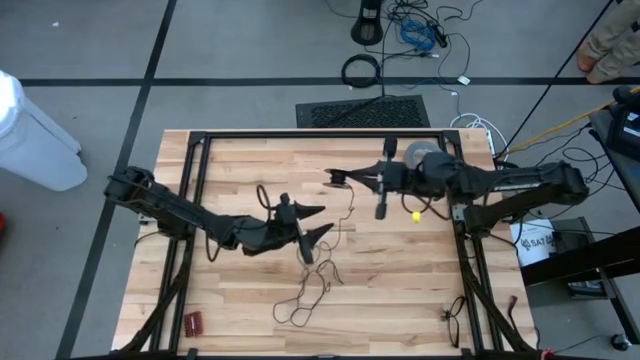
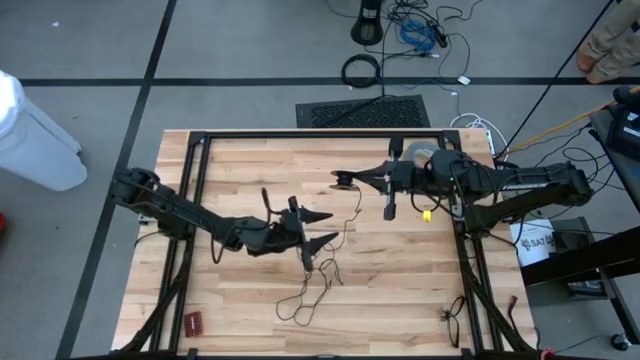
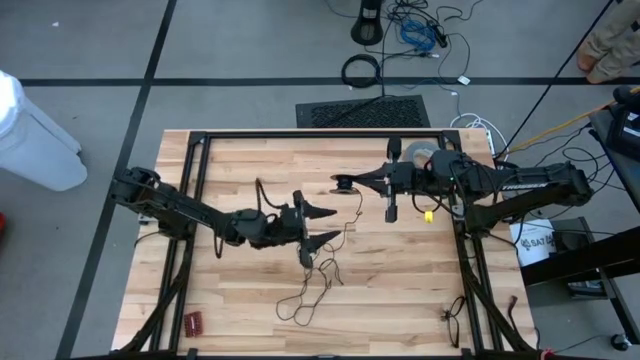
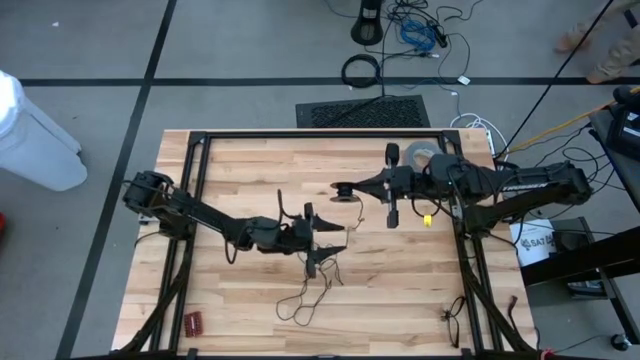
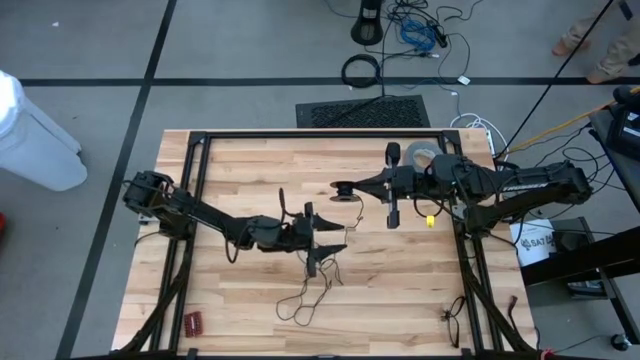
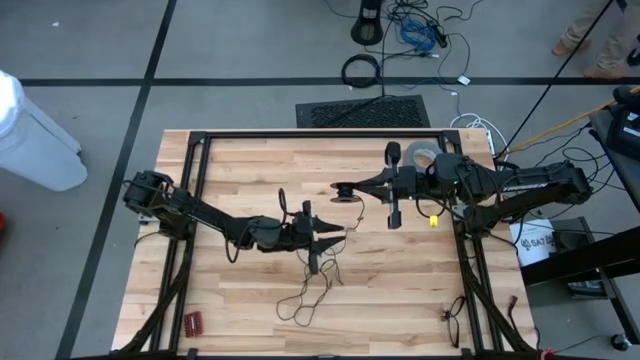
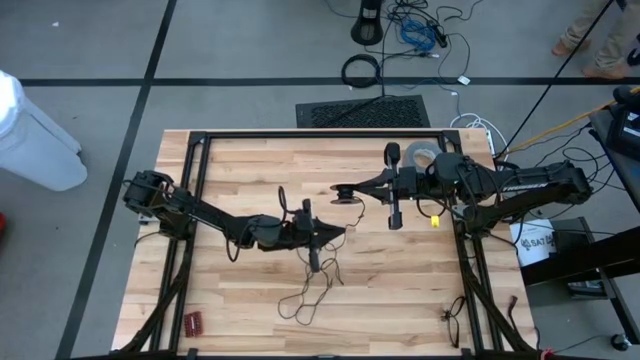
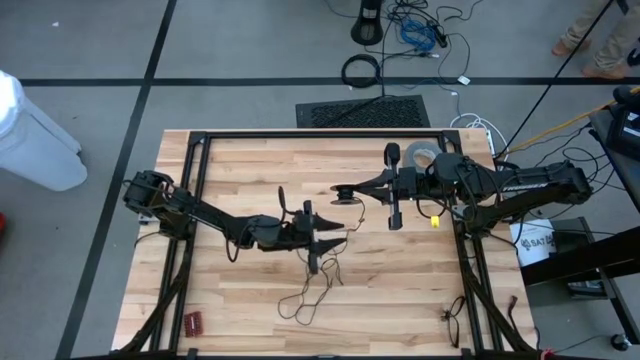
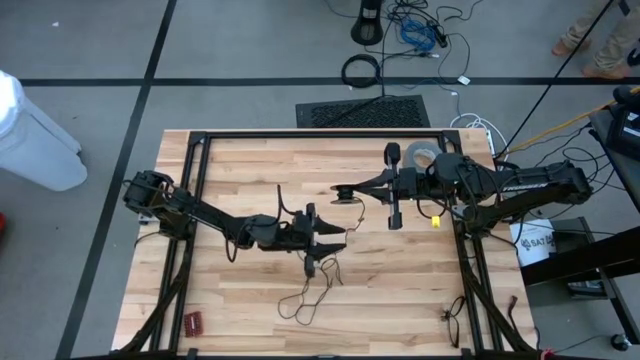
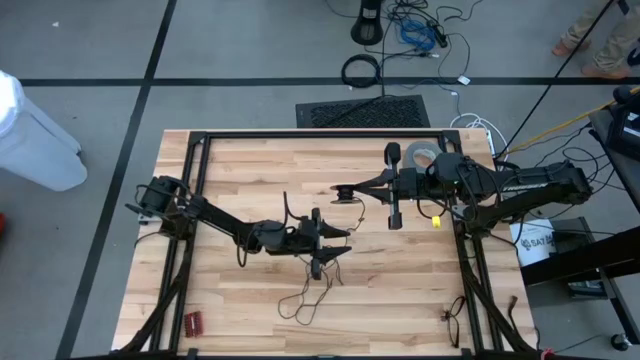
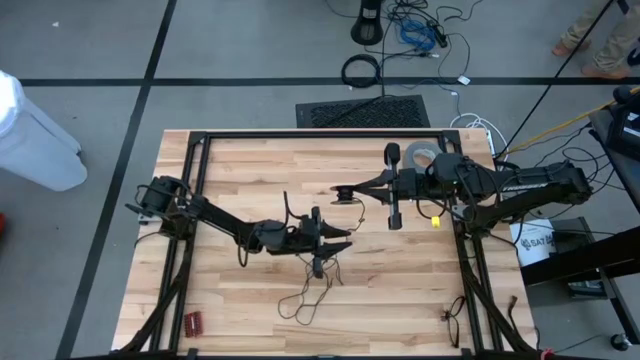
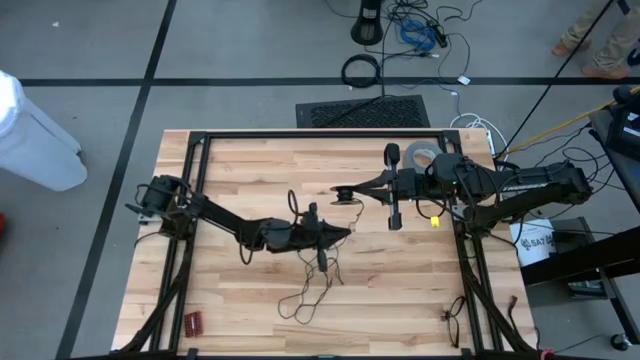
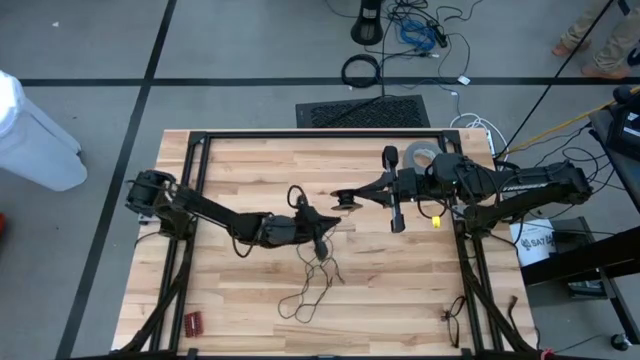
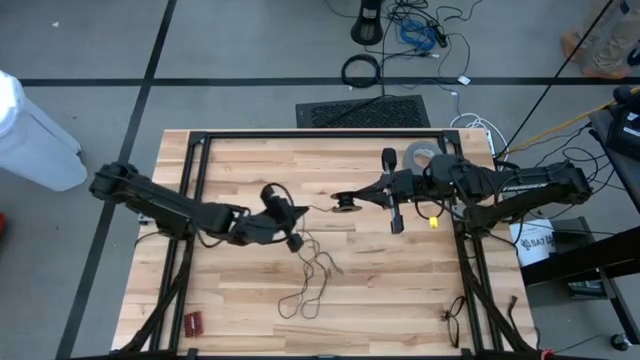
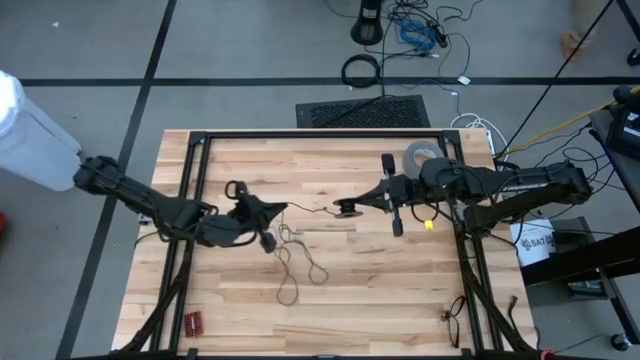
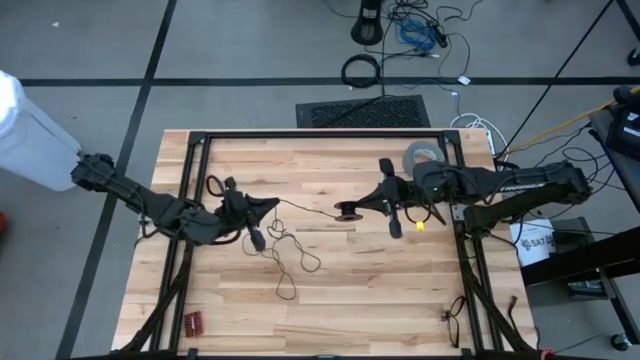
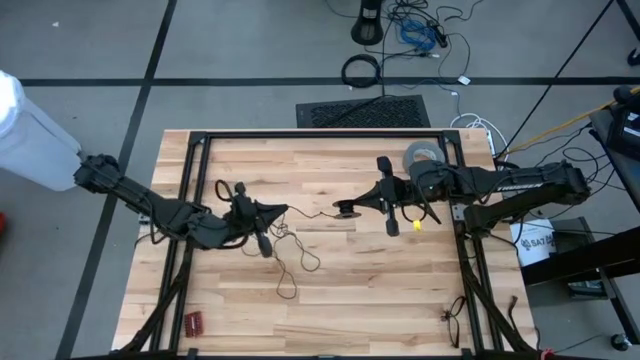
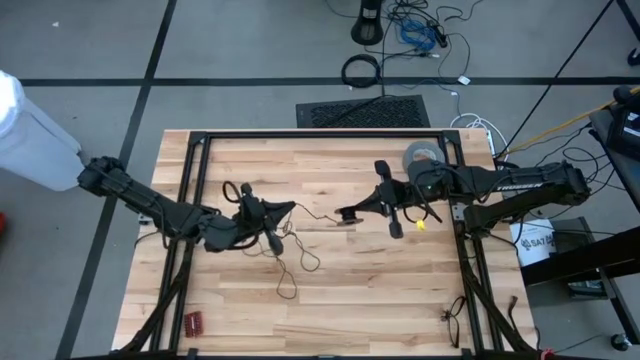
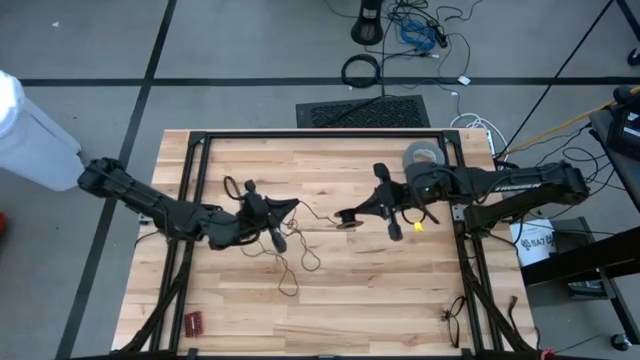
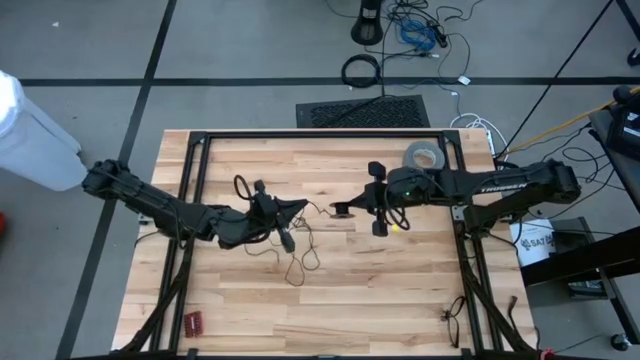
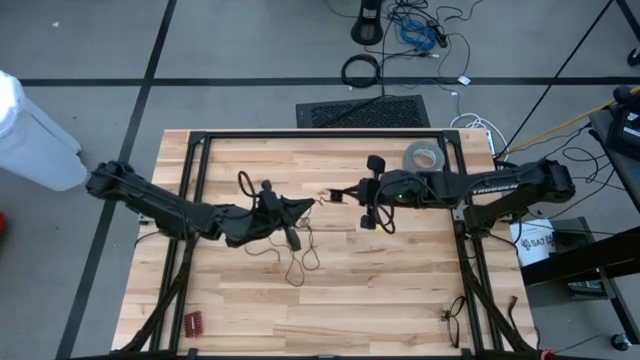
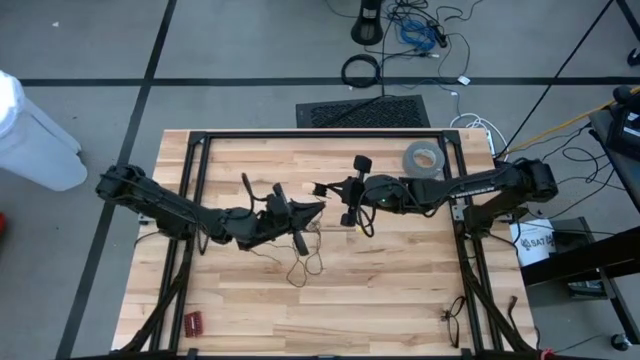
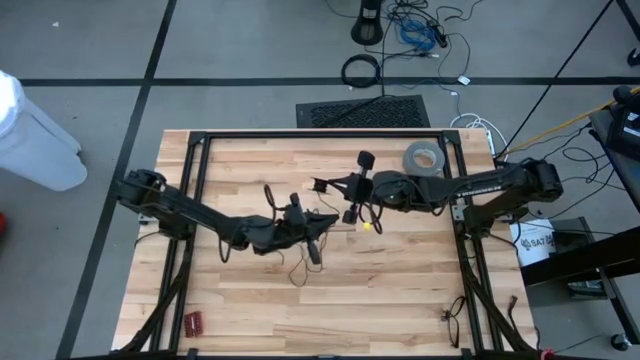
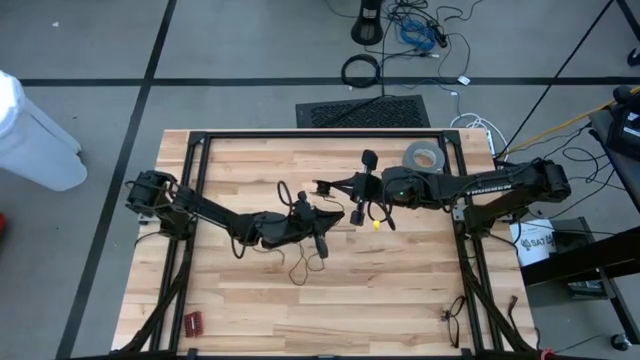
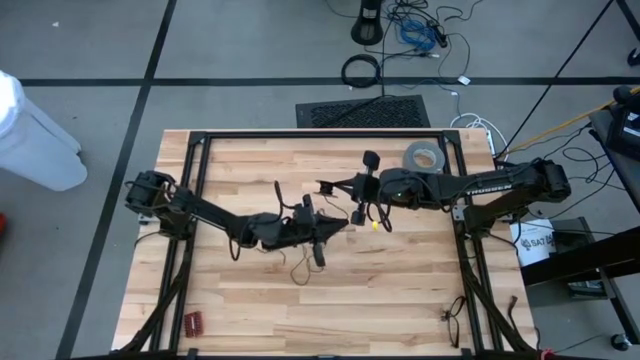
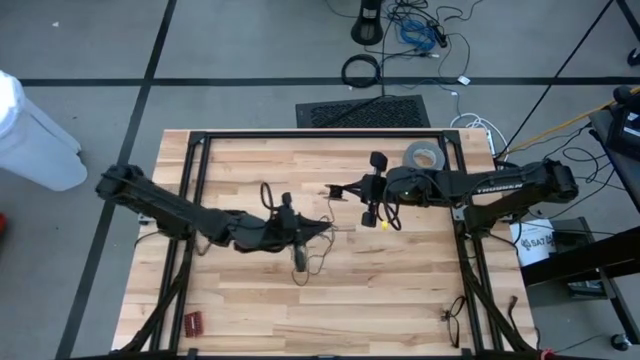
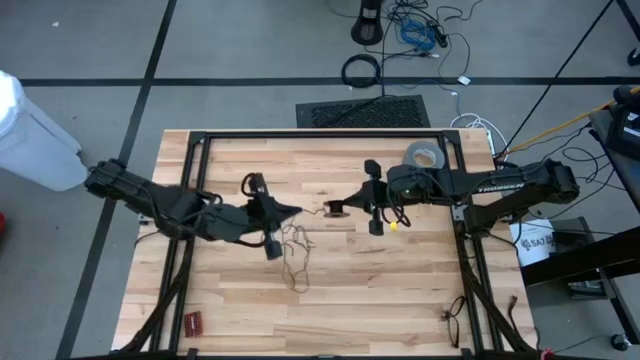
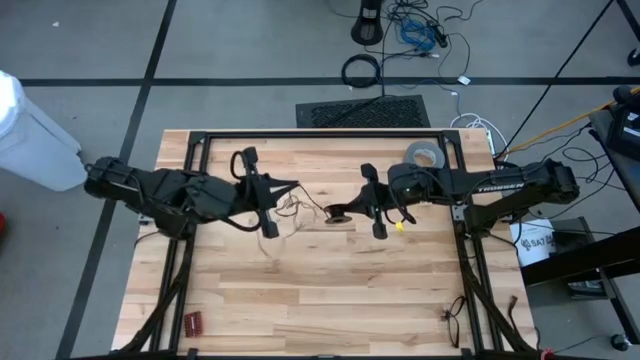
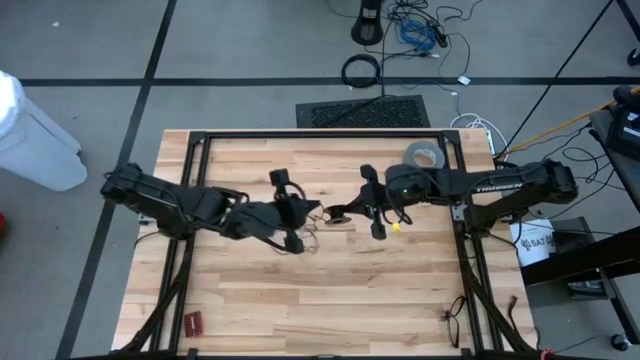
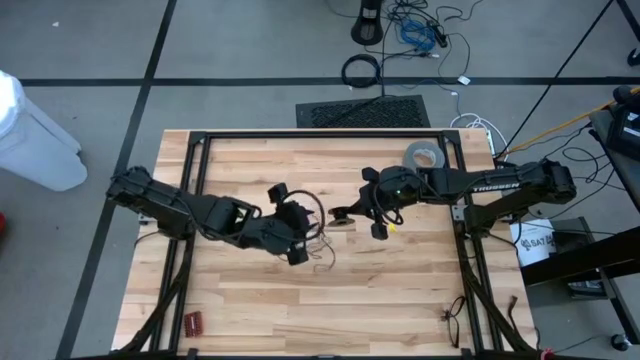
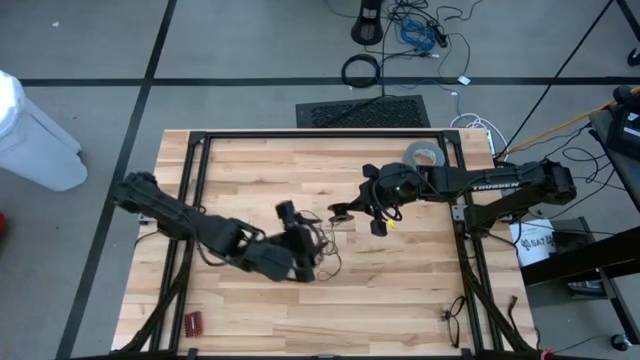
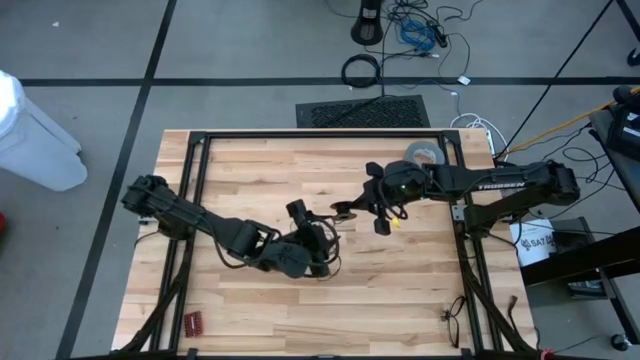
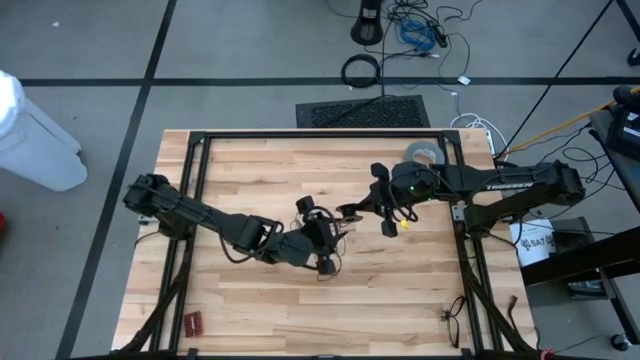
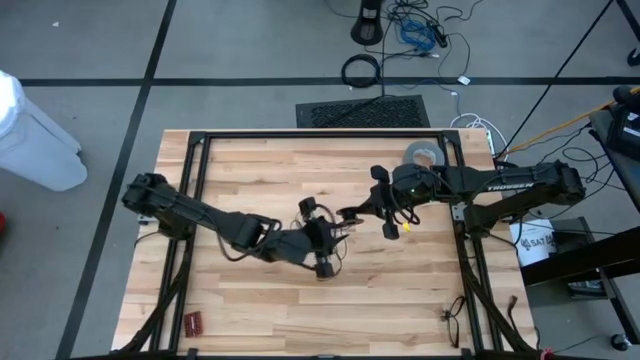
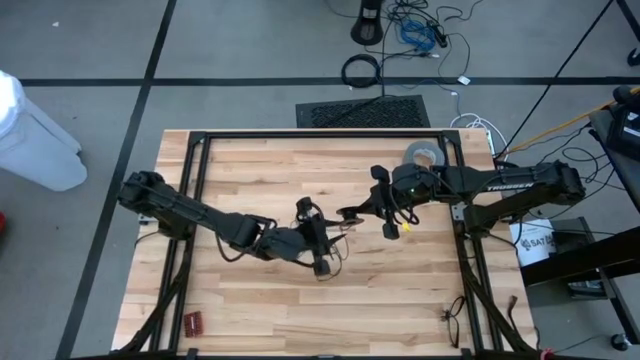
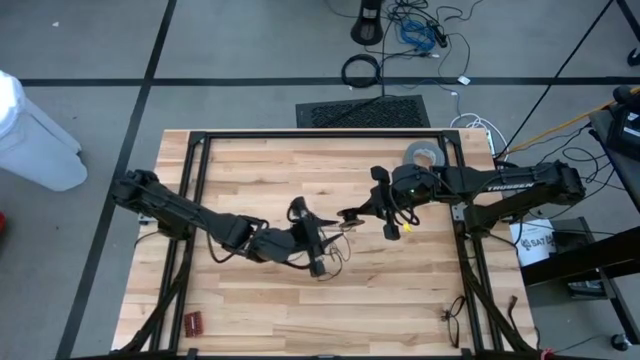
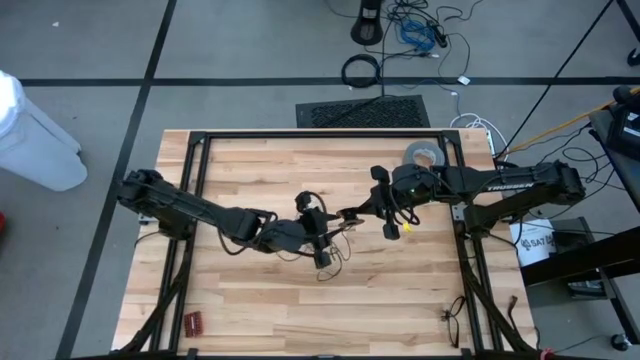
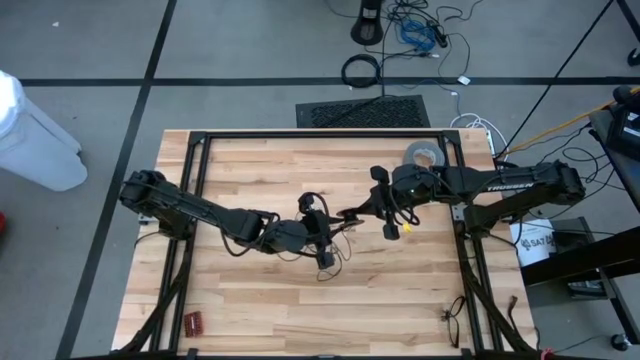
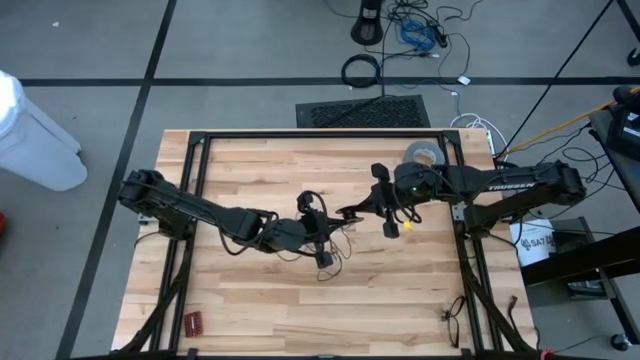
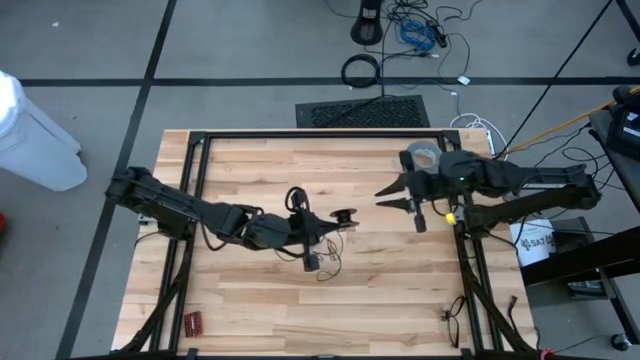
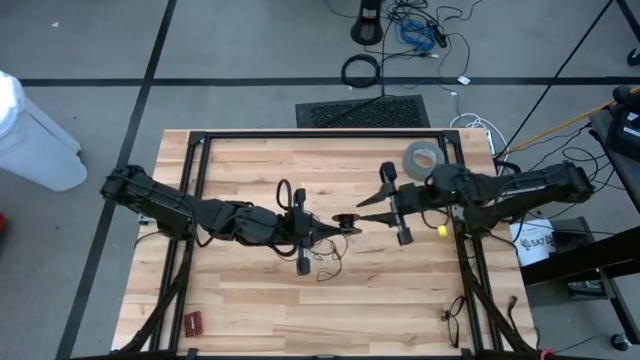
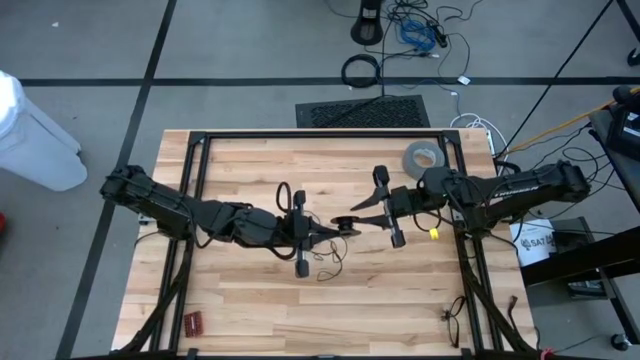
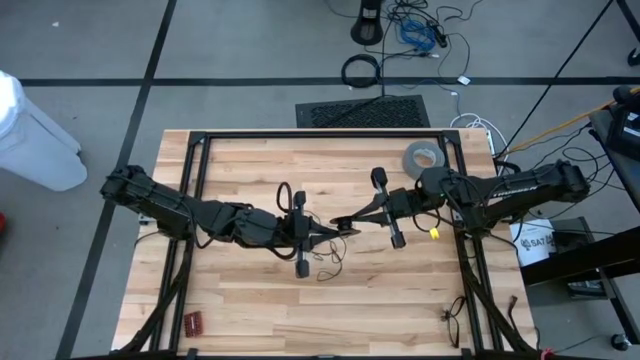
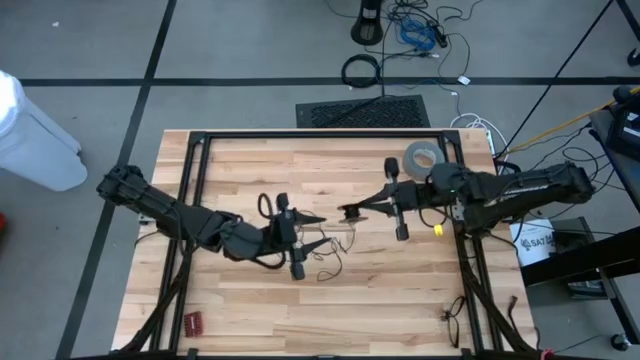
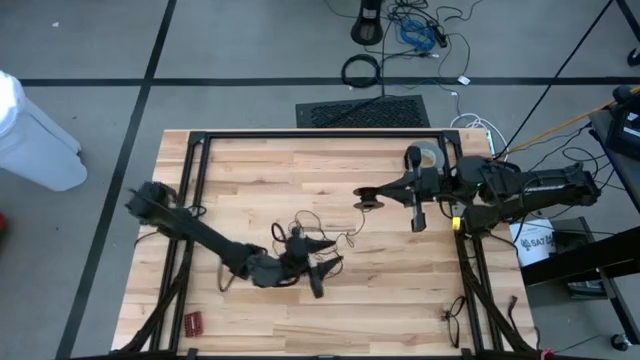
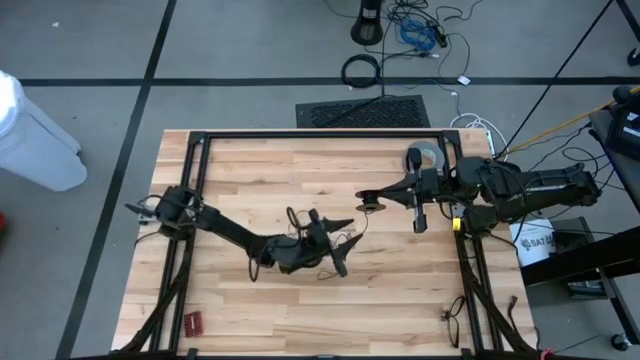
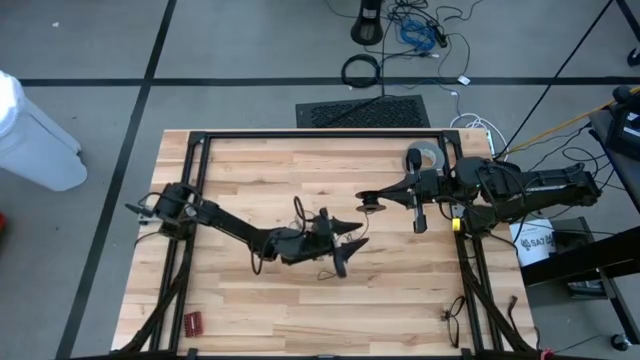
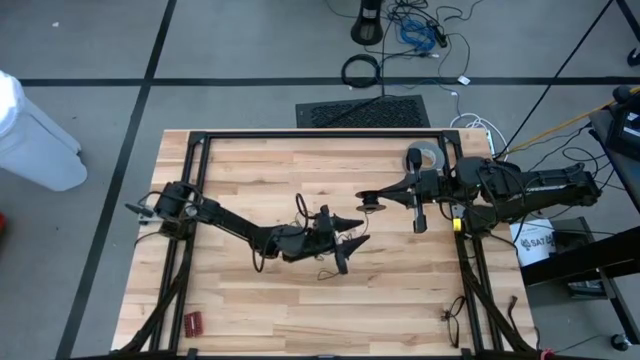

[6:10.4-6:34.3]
Task: Coil cords
Coil the black wire onto the spool
